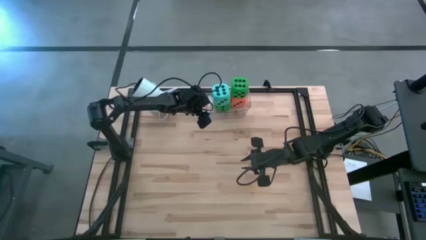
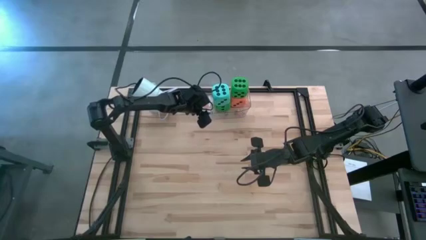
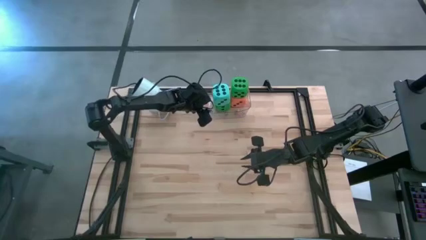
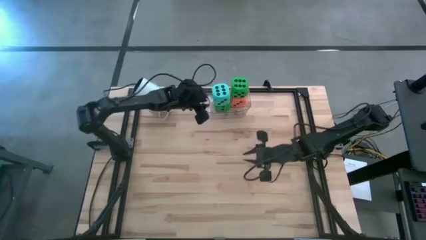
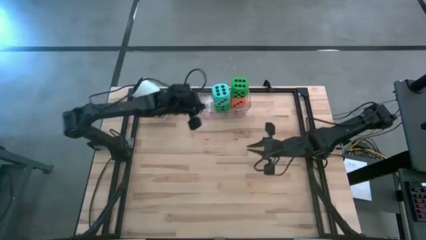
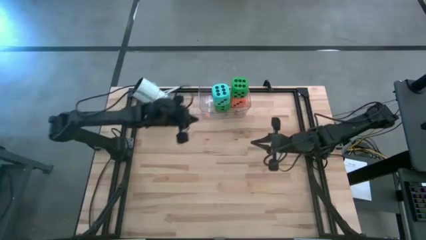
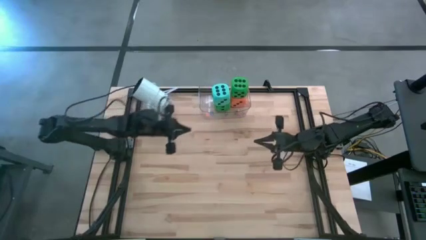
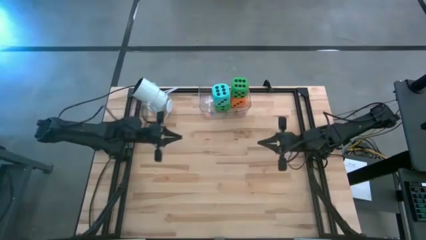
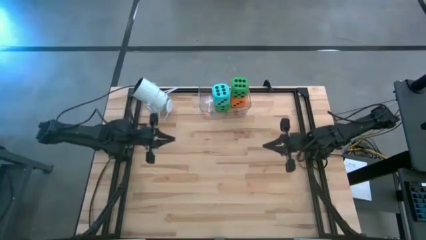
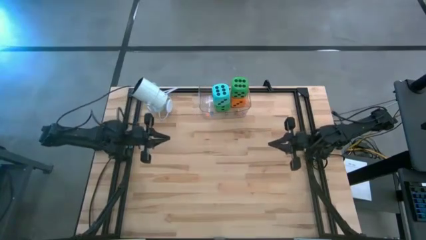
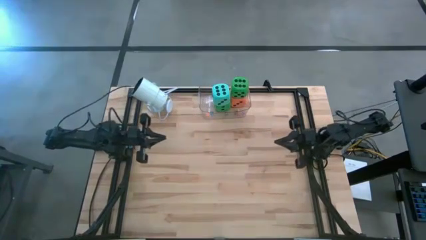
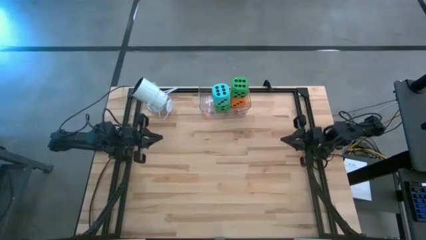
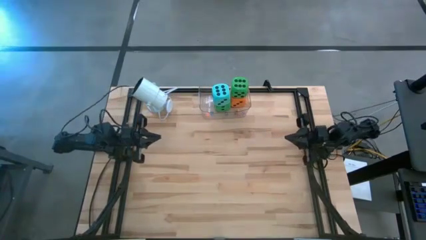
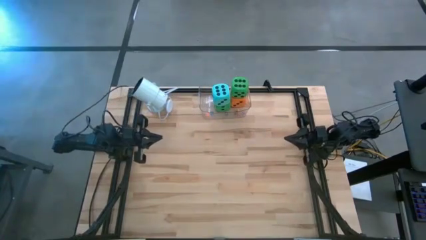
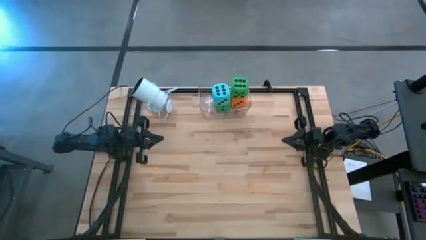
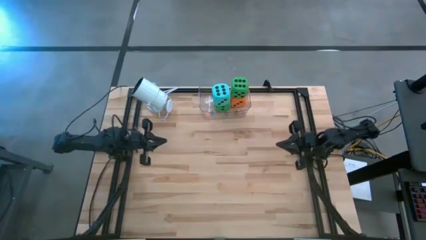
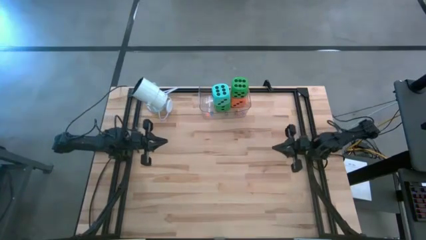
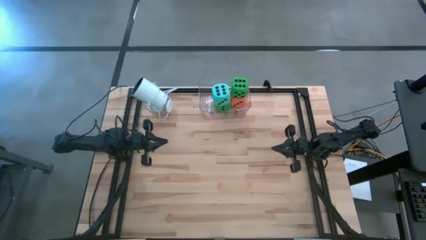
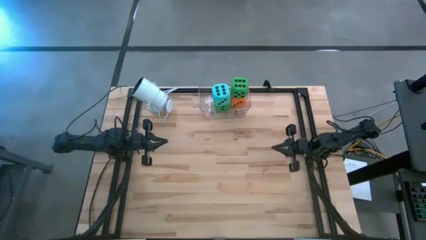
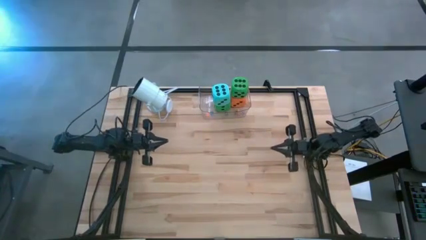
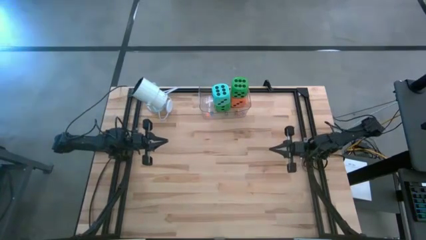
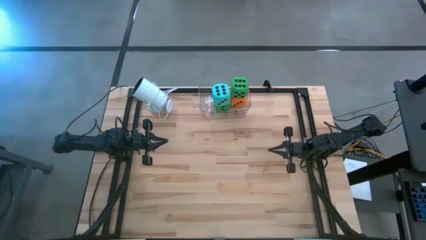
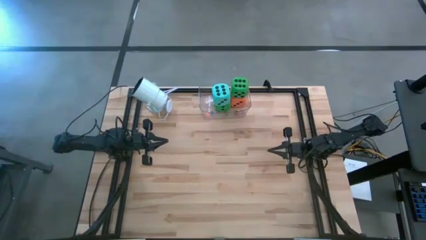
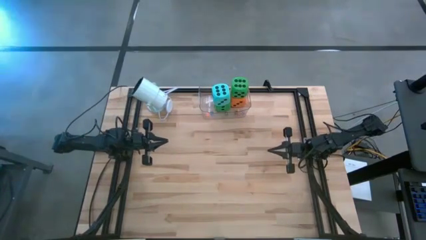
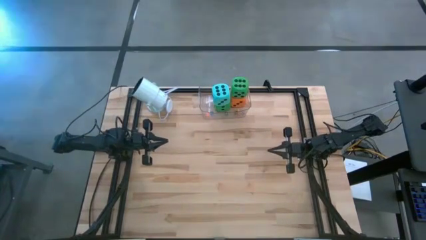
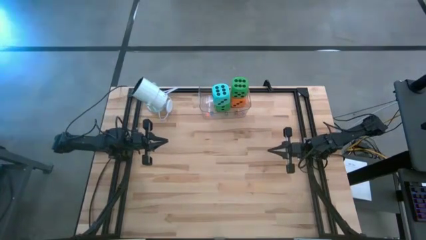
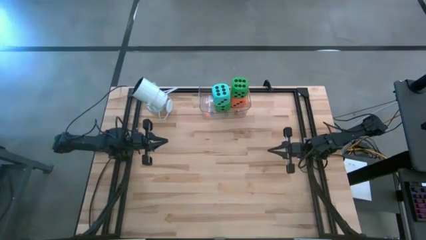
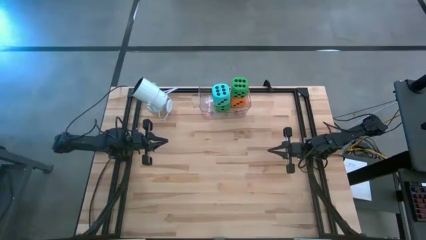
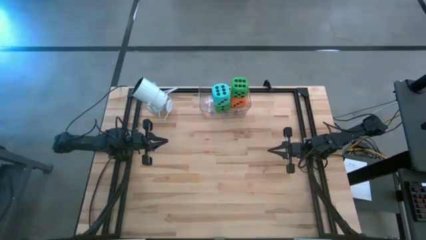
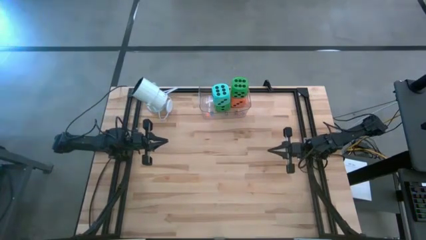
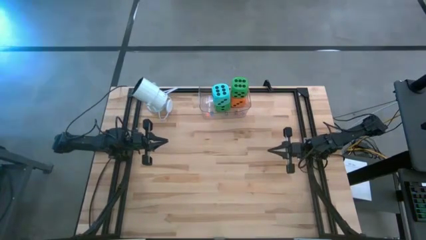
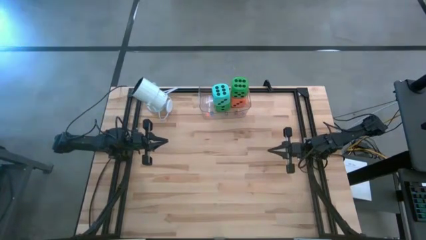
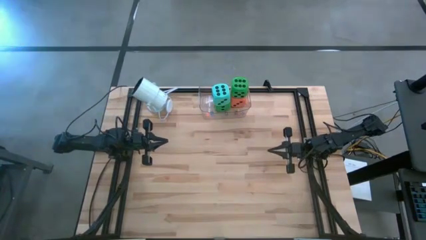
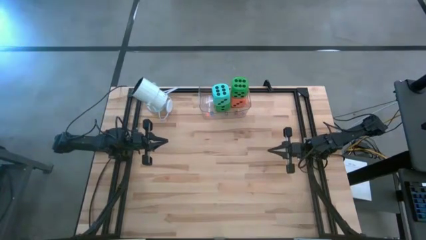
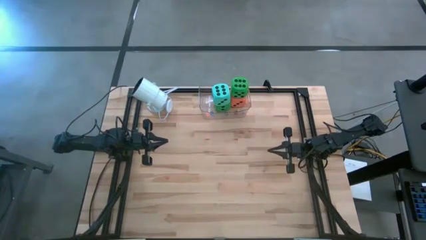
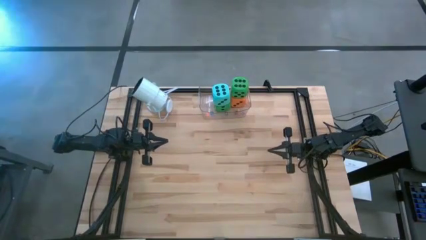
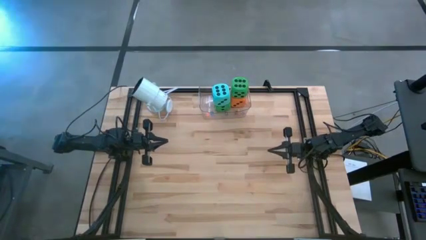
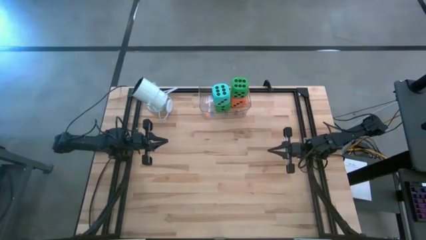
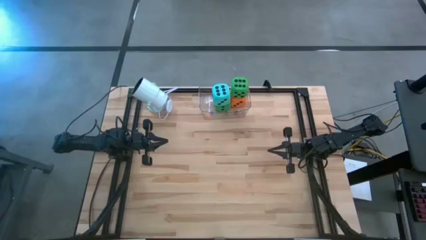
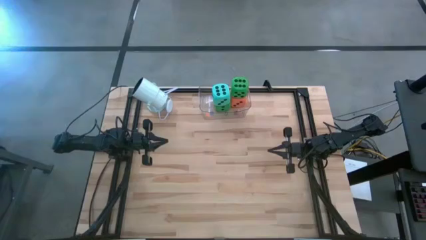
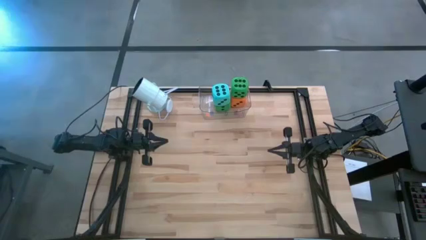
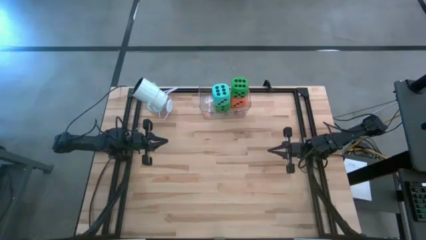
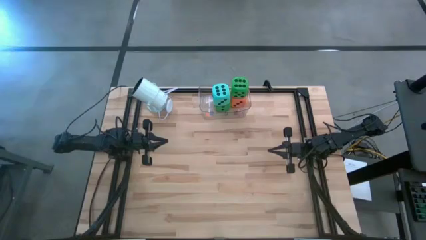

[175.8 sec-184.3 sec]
Task: Pick & Place Dice
Return to Home Position

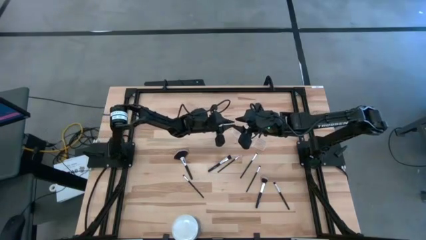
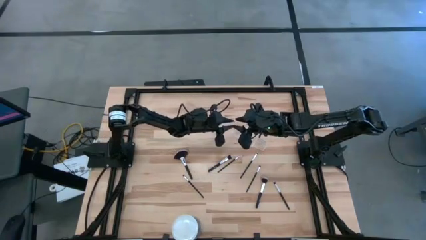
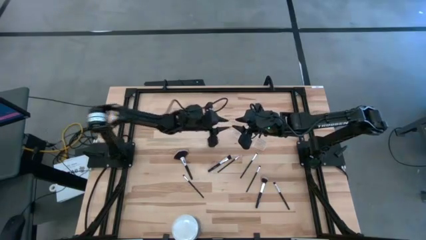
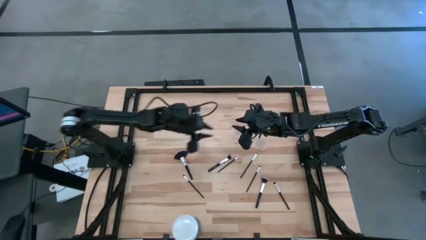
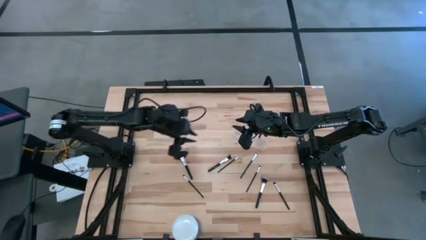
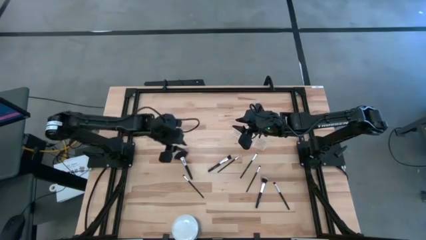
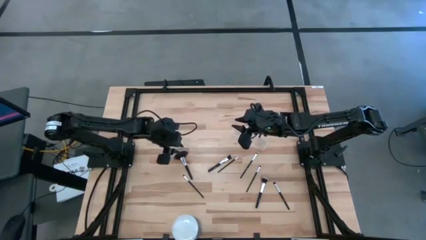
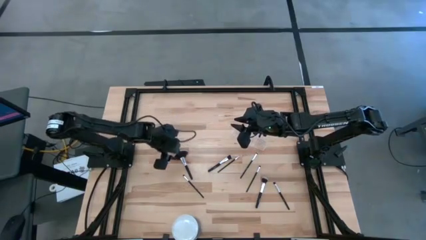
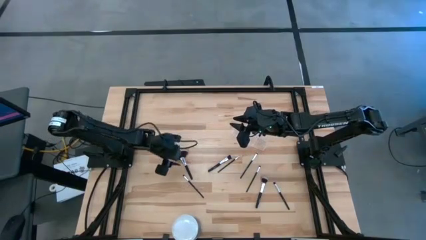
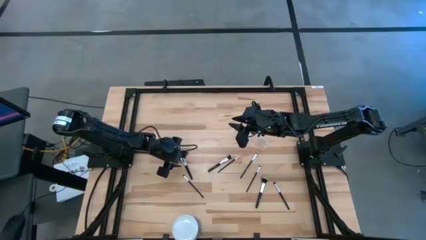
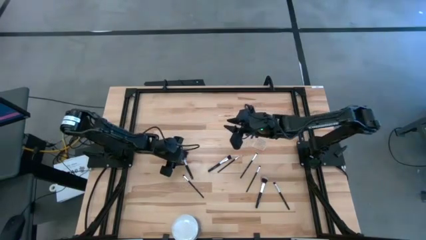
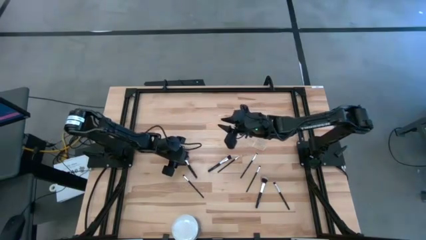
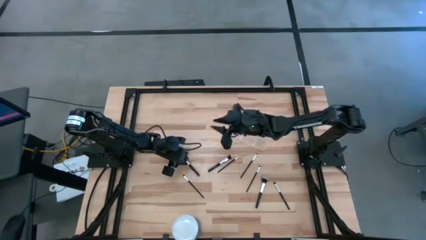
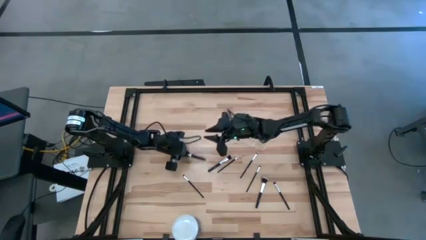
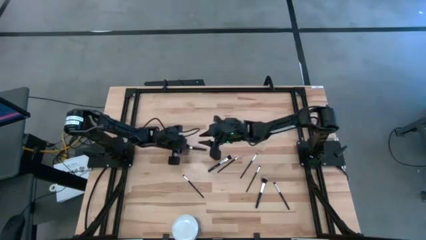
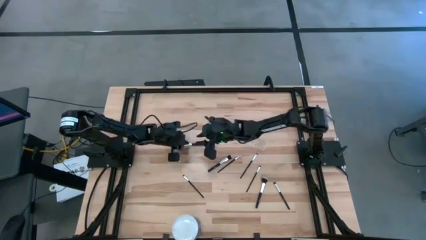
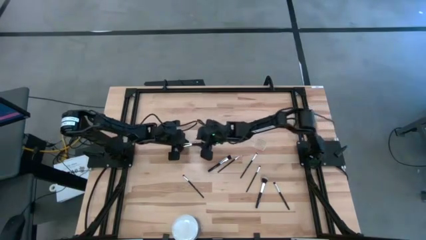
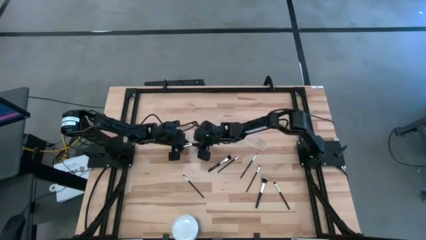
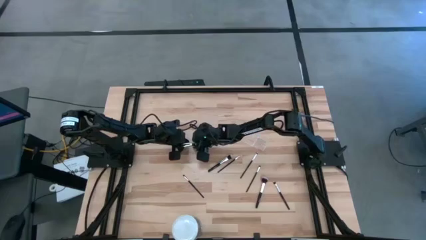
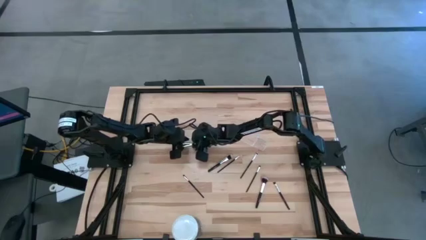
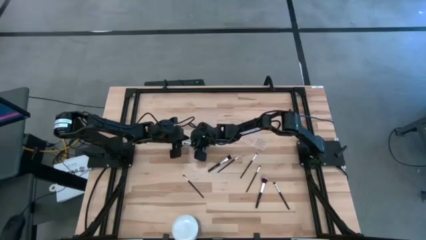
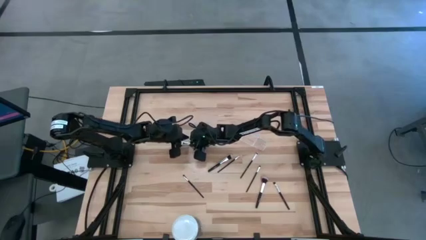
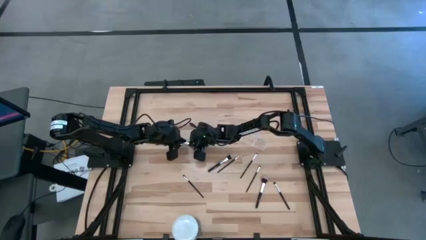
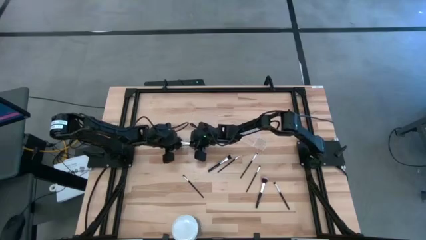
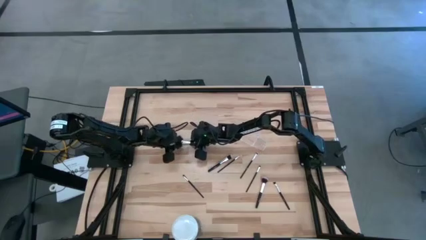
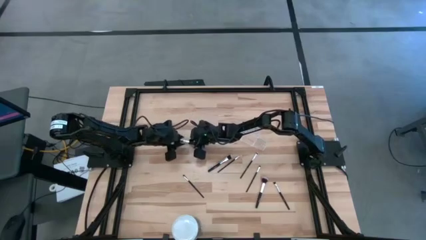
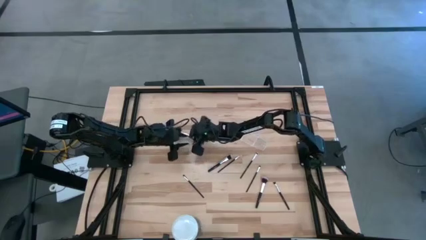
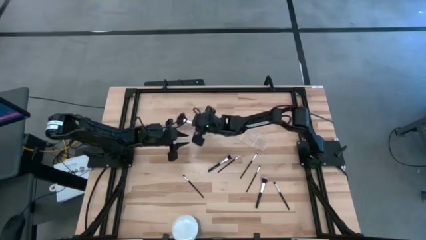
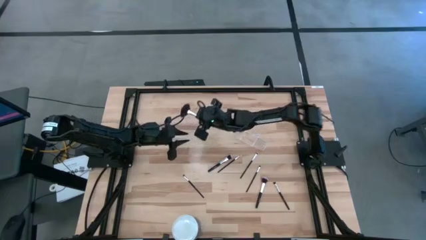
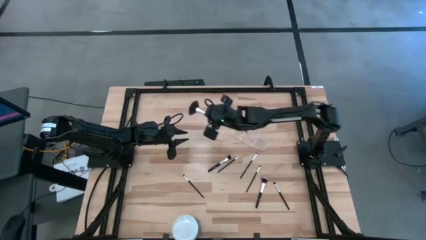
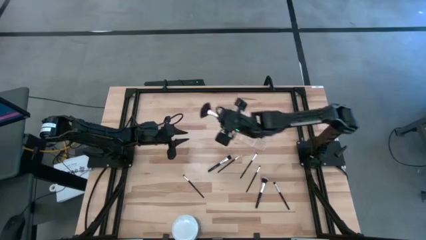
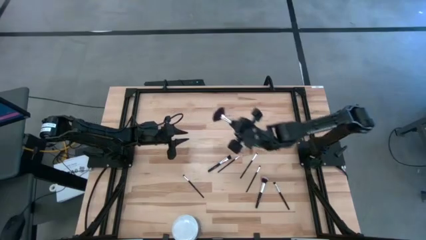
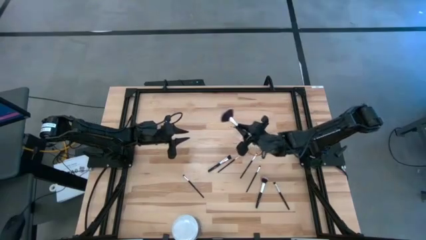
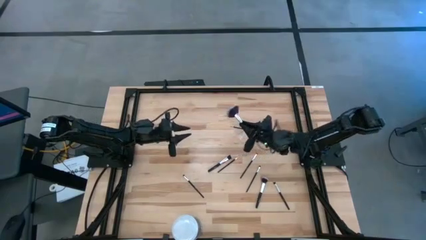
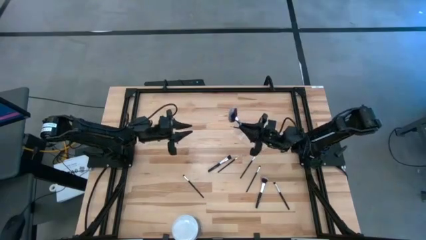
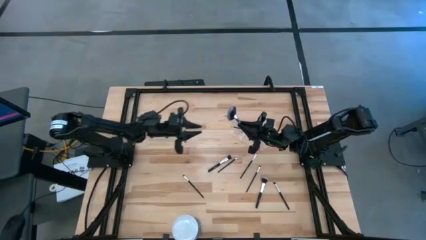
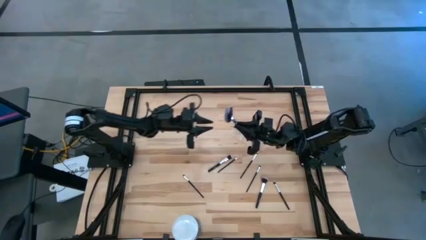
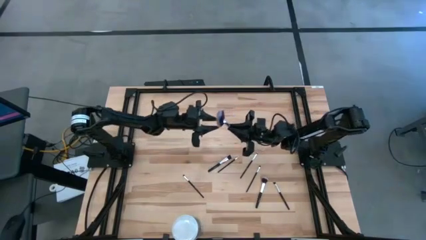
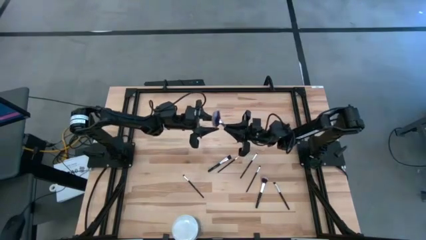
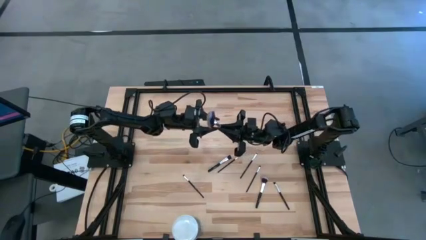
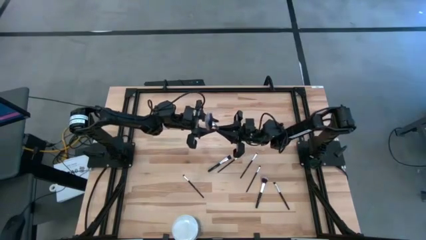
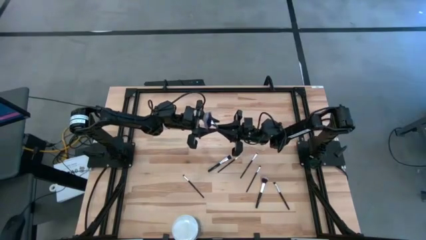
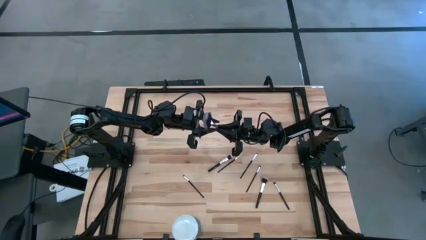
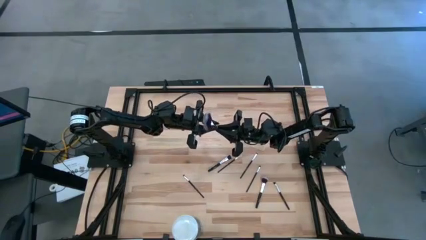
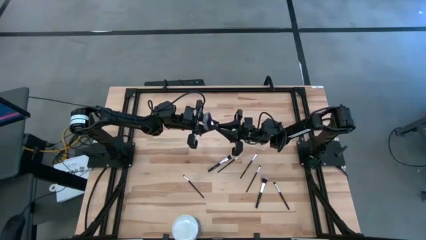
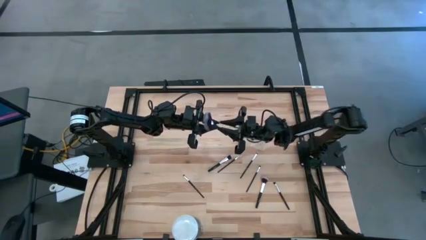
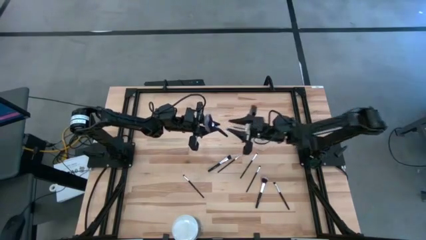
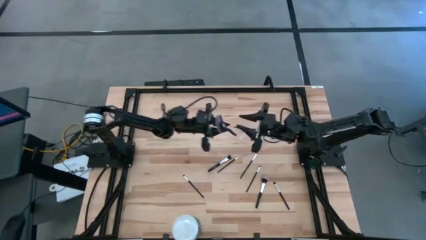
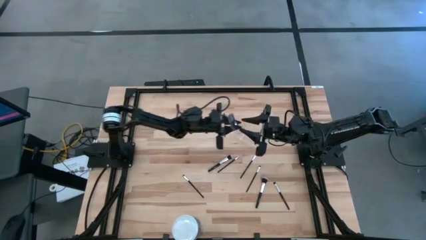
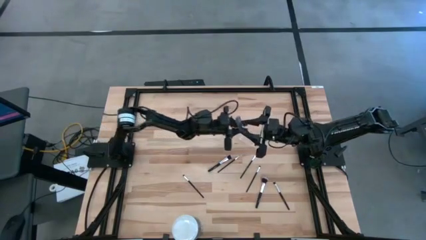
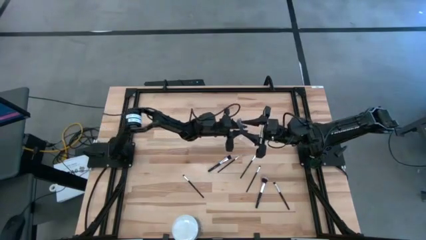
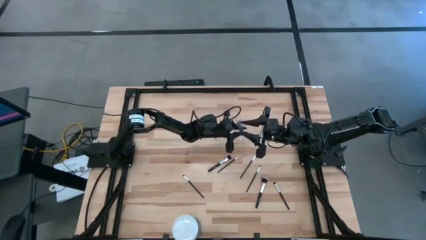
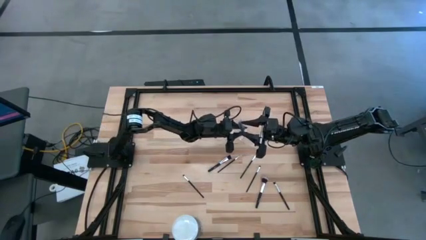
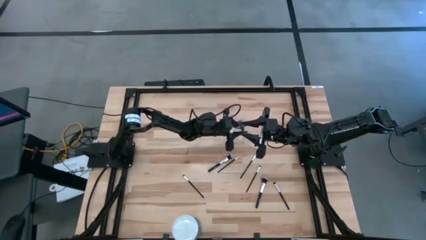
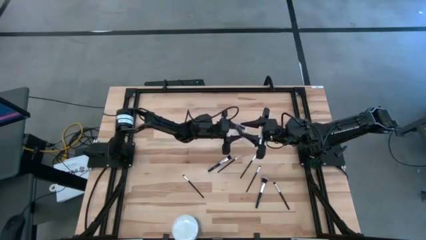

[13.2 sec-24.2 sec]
Task: Pick & Place Makeup Brushes
Put the black highlighter brush into the makeup organizer
